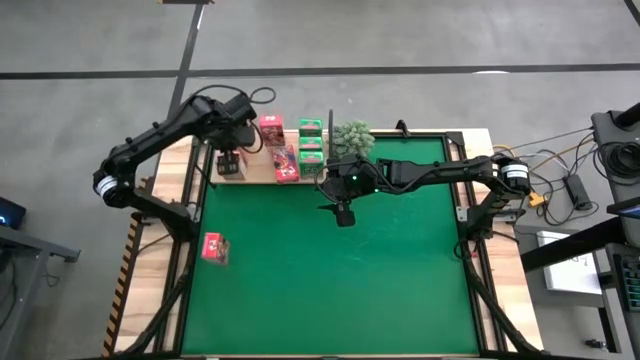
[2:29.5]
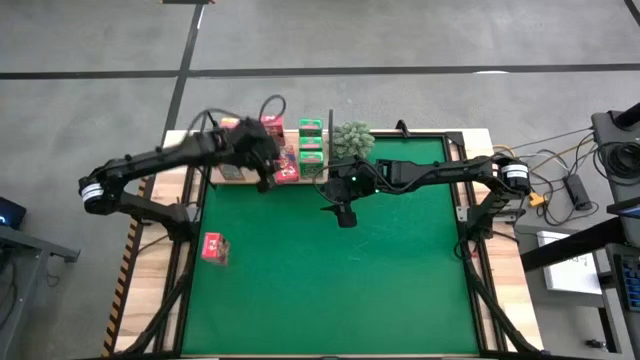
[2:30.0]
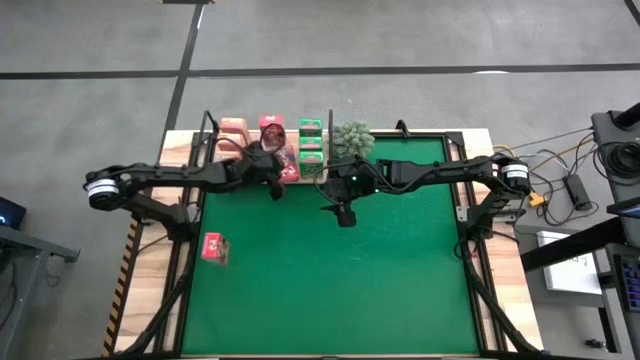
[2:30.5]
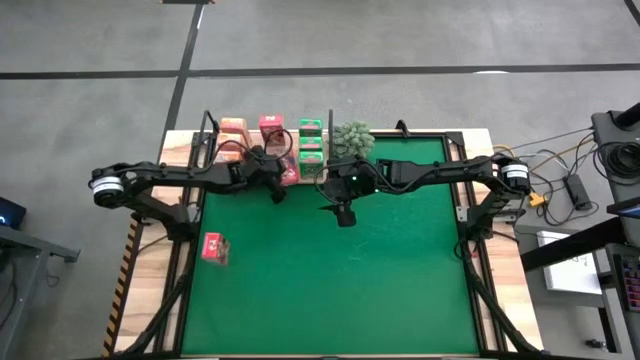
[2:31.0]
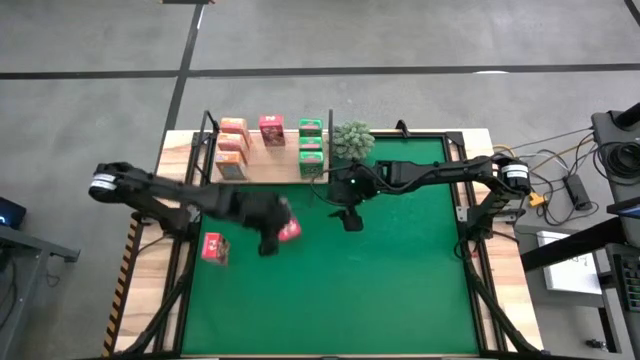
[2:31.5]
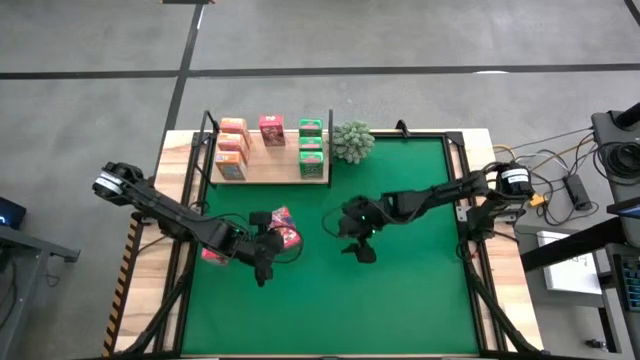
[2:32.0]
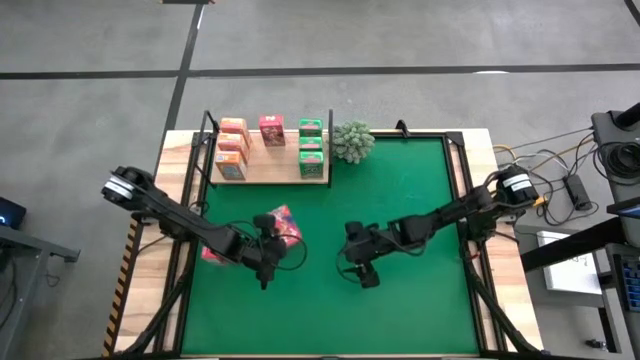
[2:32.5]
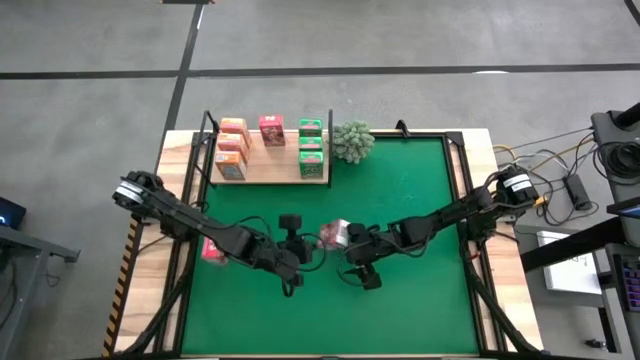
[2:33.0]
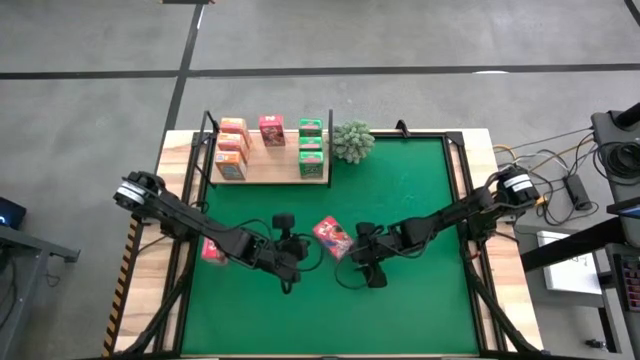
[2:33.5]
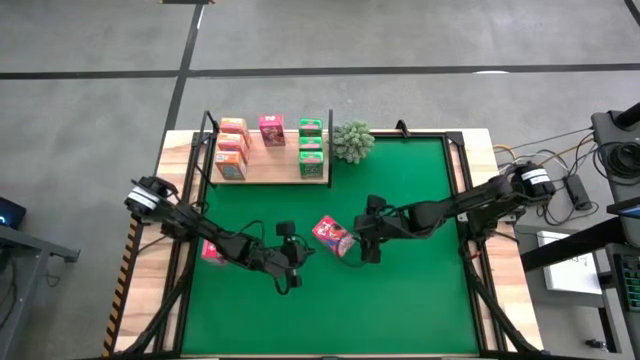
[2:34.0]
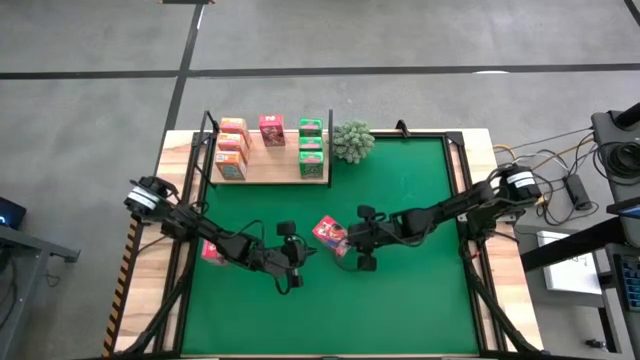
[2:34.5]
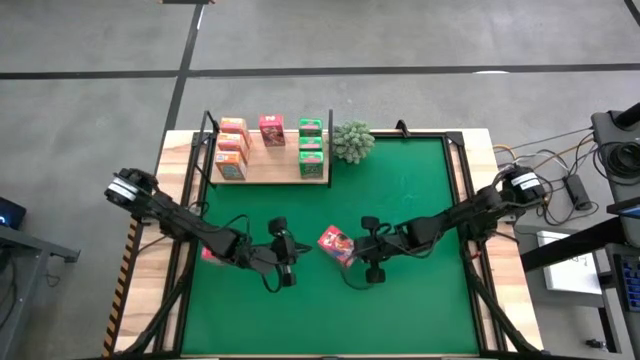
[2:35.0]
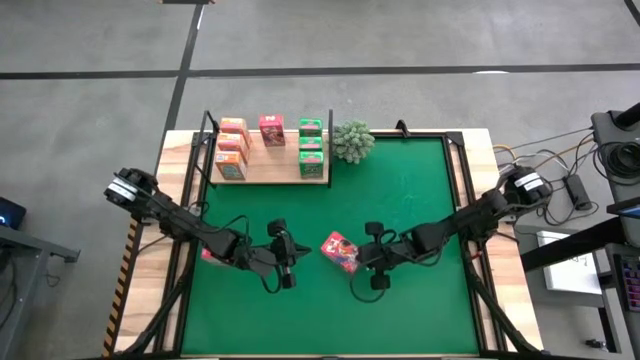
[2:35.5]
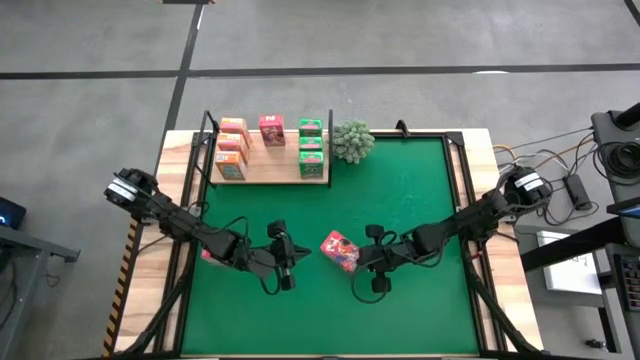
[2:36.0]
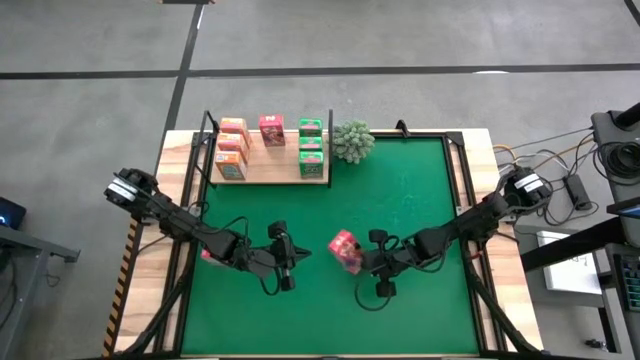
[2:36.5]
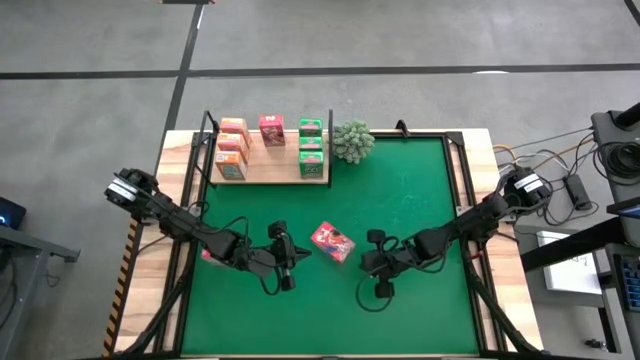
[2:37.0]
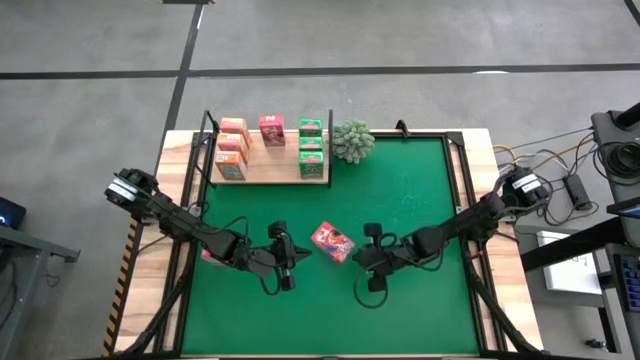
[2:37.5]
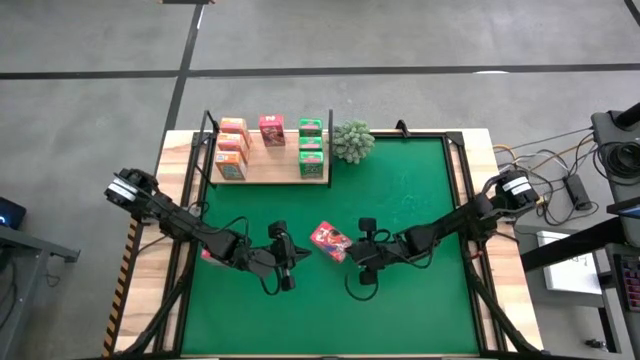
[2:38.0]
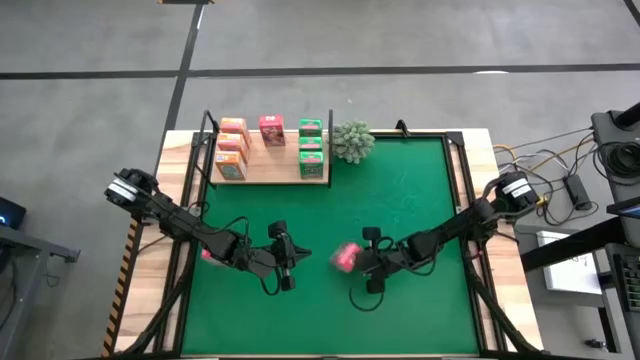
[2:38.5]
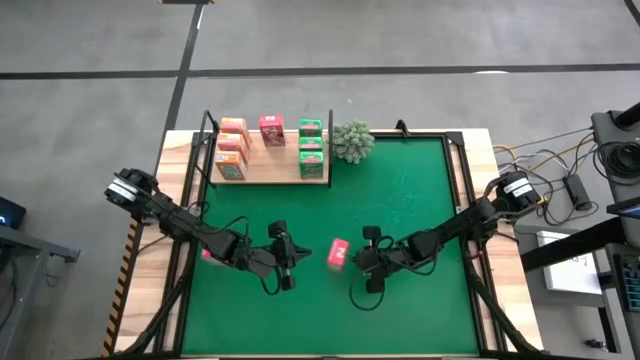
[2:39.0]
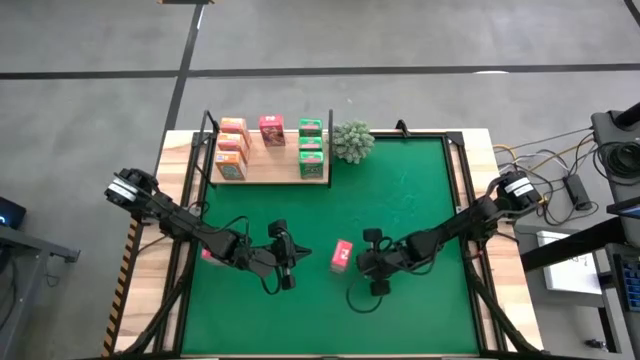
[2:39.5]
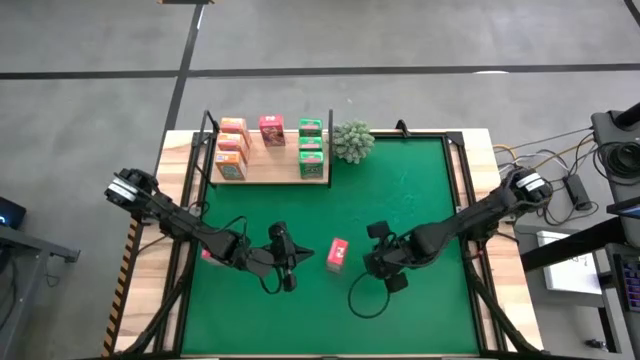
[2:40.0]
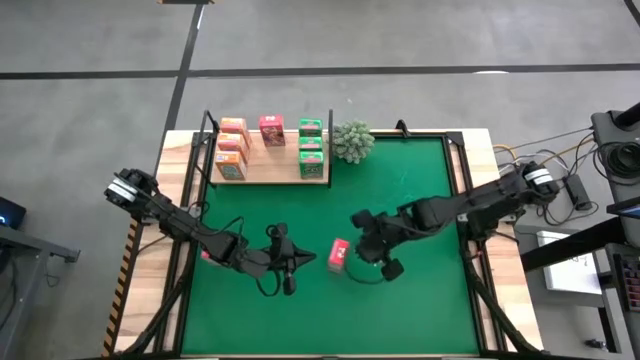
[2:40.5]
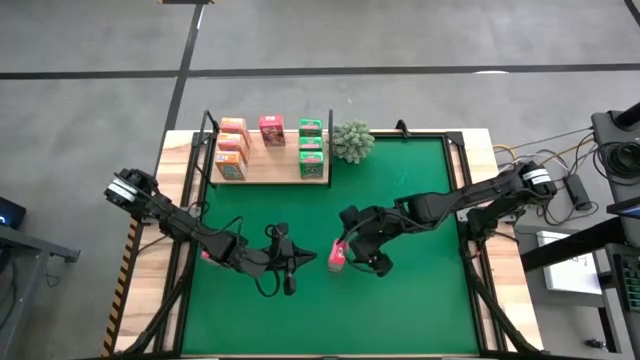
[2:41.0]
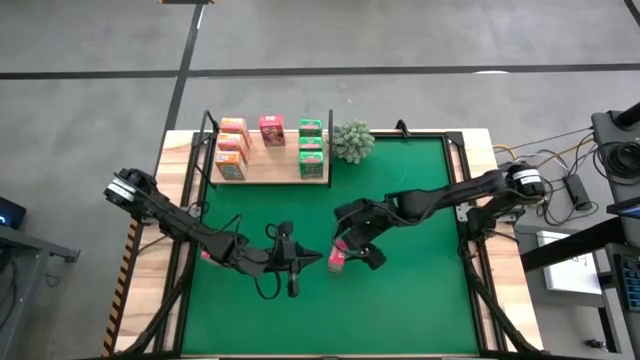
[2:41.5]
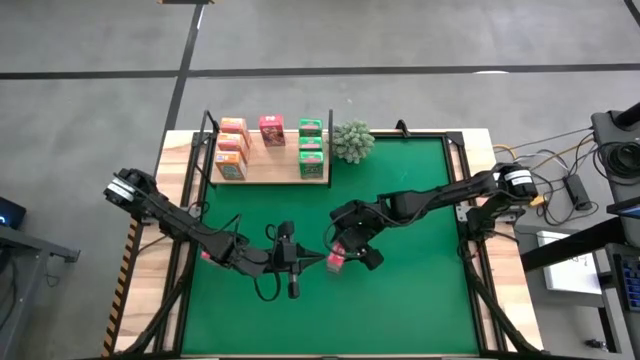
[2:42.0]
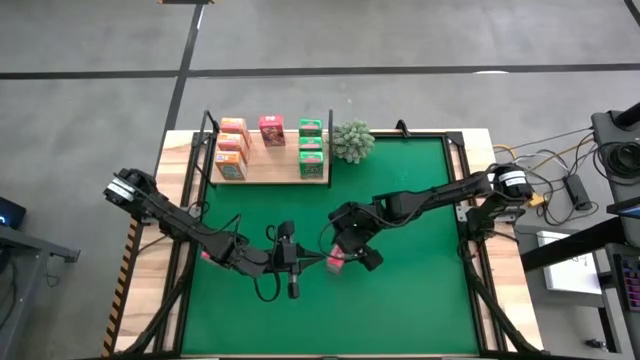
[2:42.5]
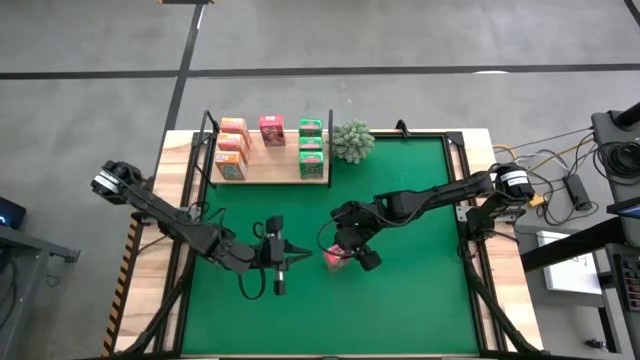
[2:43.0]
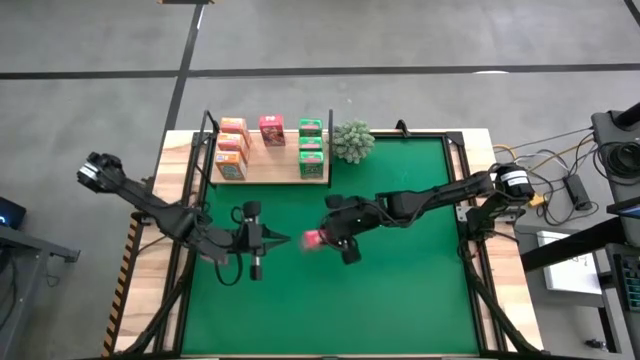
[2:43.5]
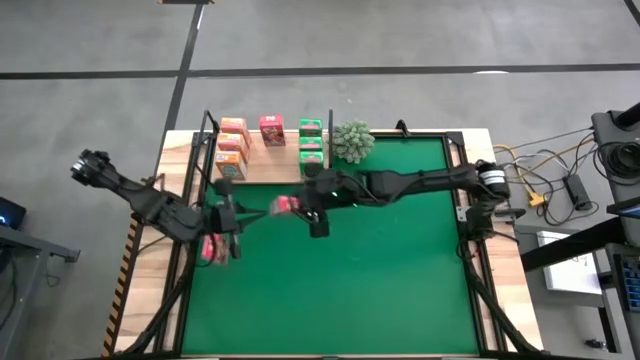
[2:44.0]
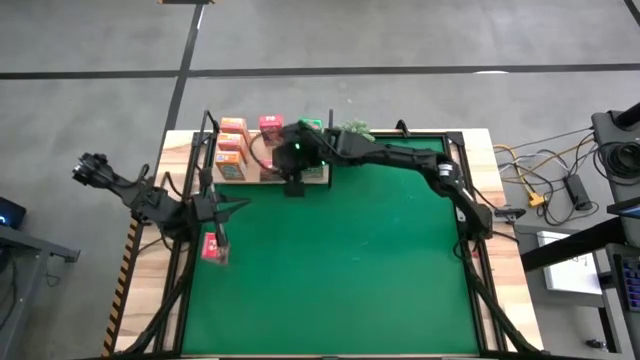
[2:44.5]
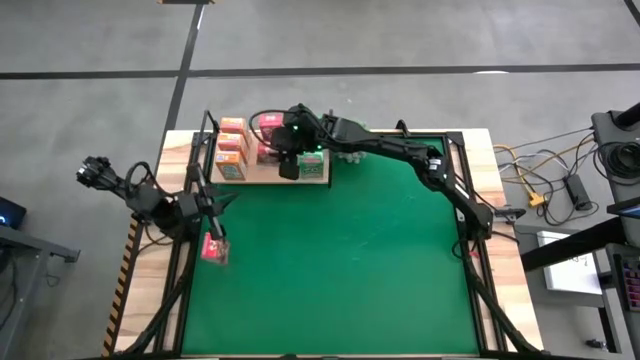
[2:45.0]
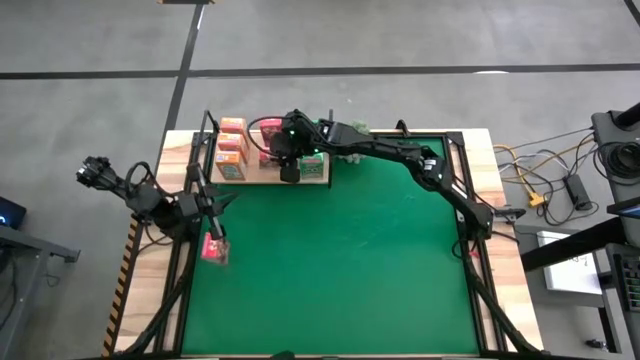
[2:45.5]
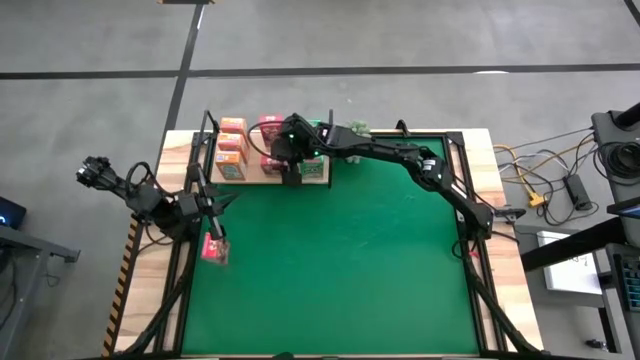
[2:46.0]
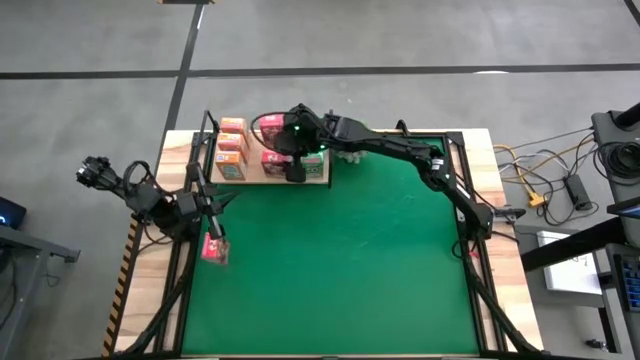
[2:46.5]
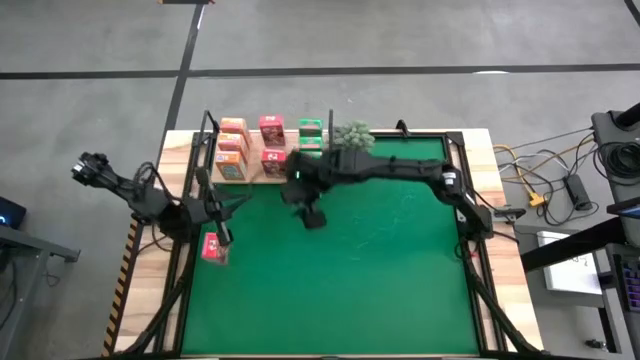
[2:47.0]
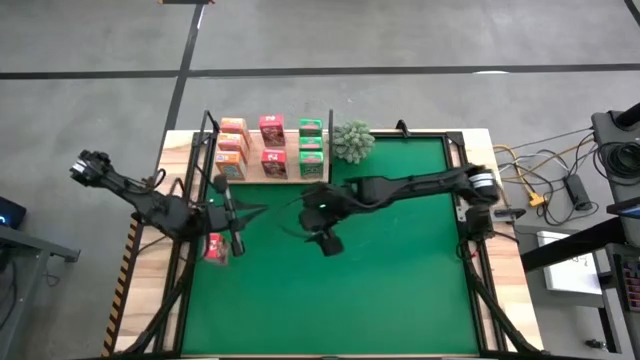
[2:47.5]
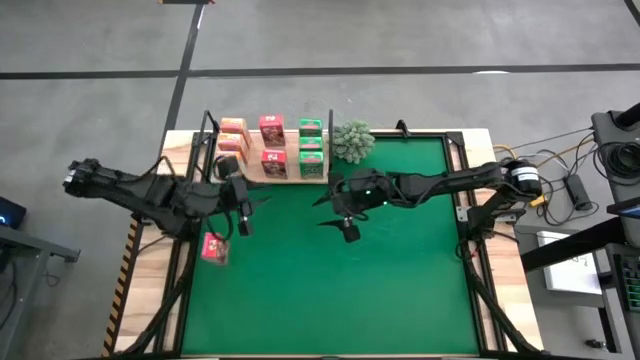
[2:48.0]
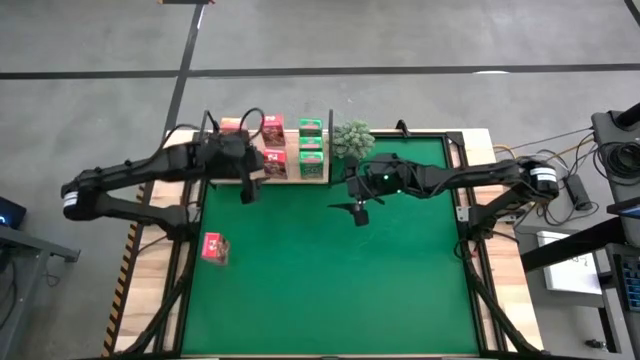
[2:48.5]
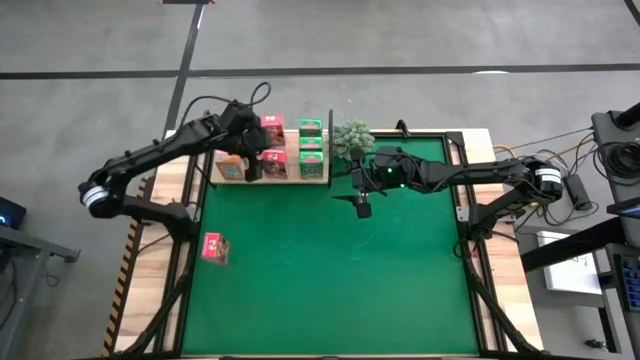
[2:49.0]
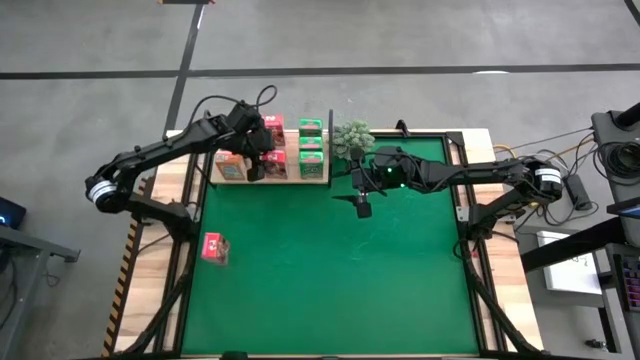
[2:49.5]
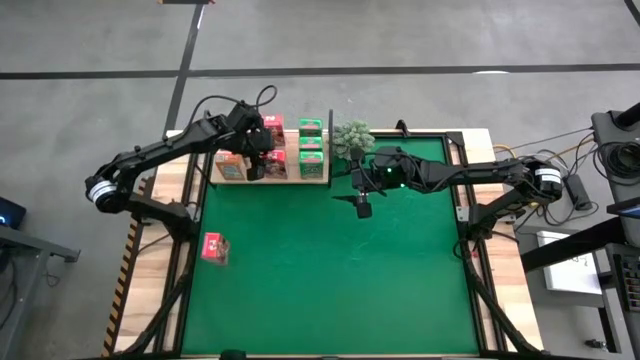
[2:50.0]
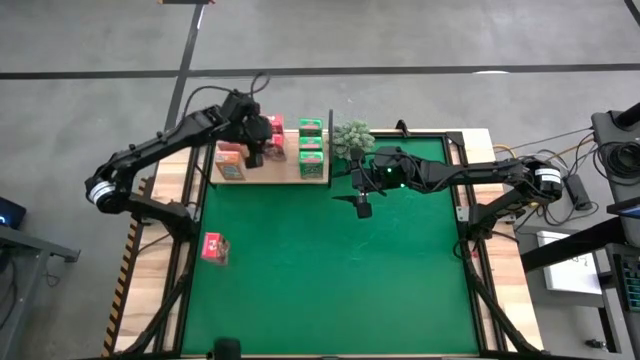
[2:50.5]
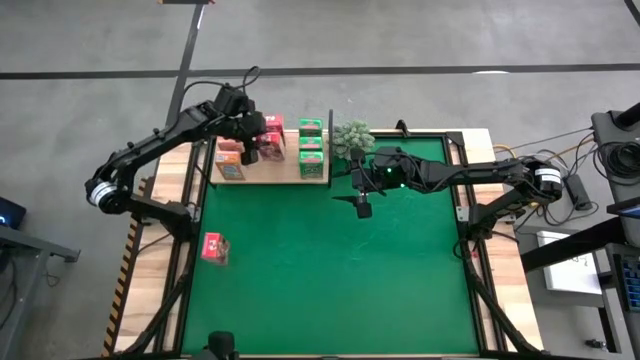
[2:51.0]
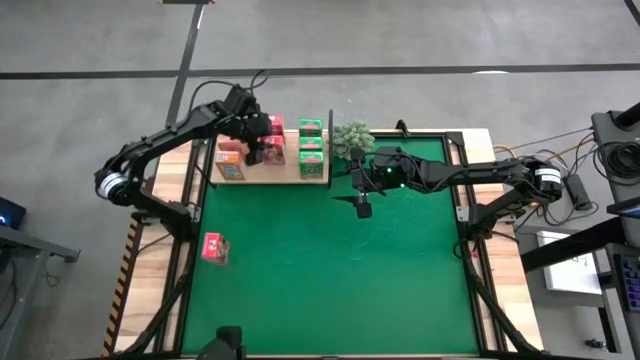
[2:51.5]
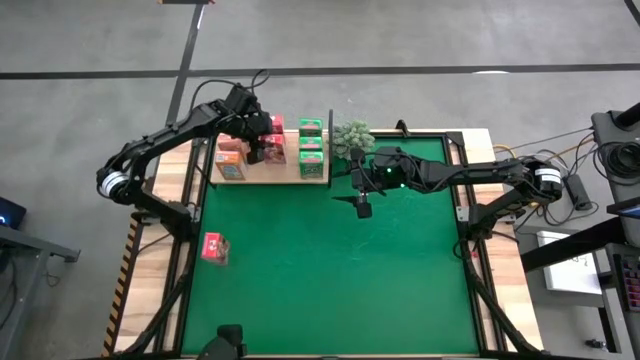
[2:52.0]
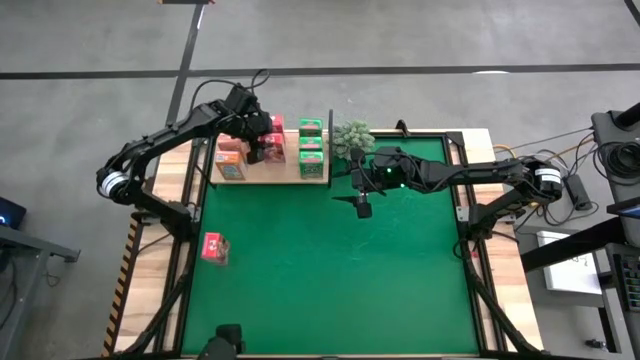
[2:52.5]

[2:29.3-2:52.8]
Task: Stack cereal on shelf
Put the right red cereal box on the shelf aligned with the other red cereal box
